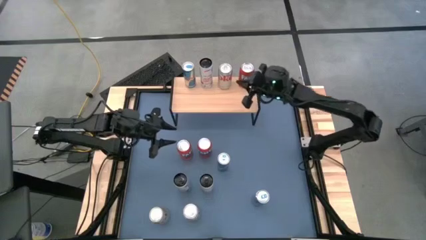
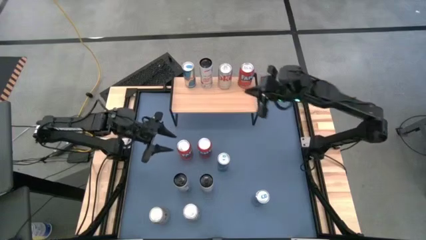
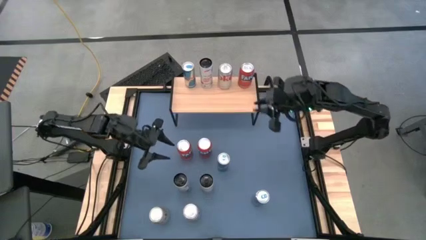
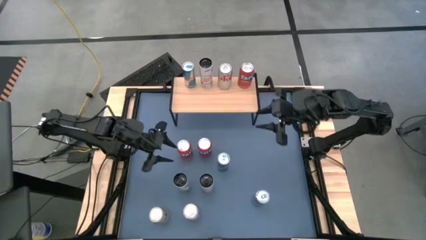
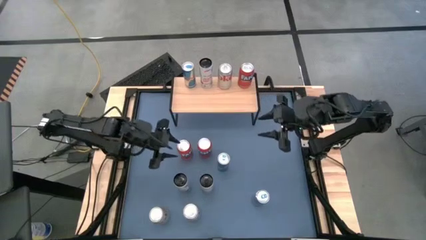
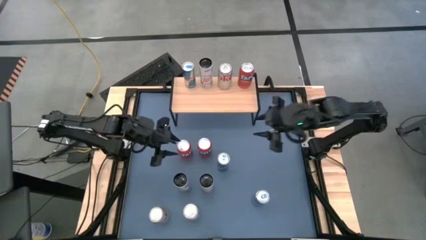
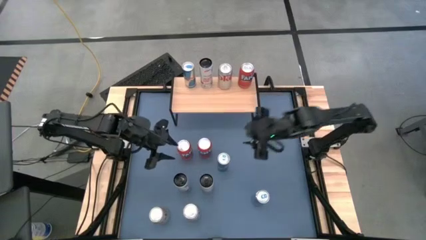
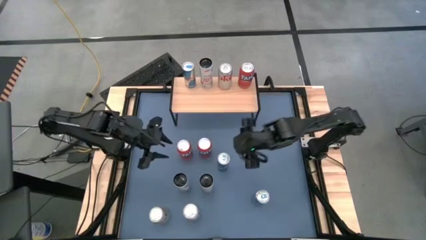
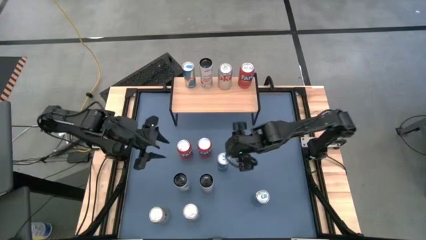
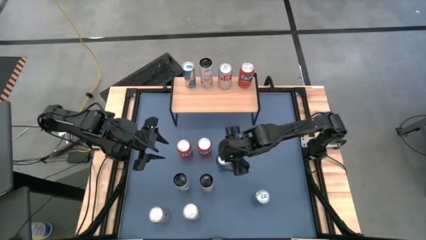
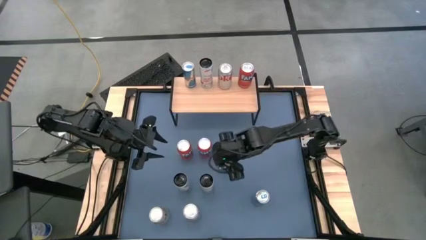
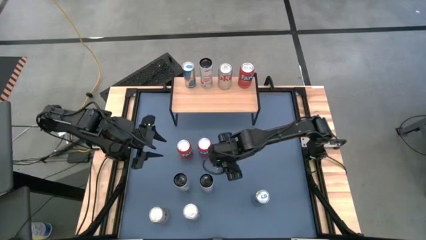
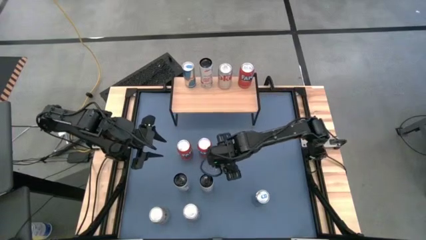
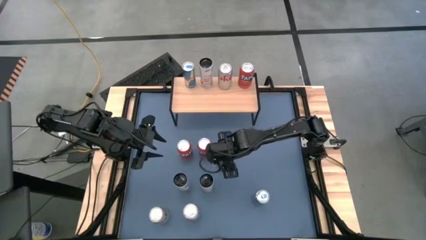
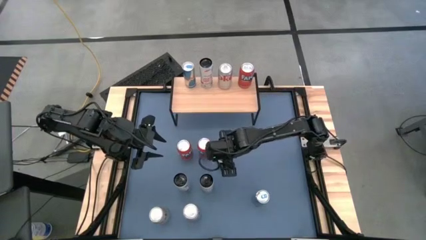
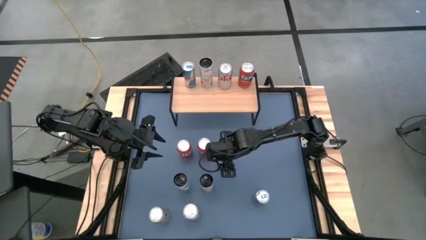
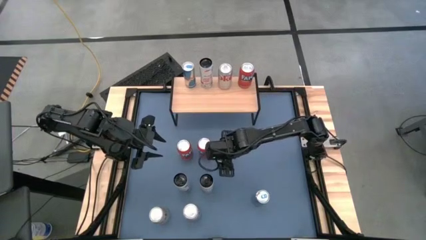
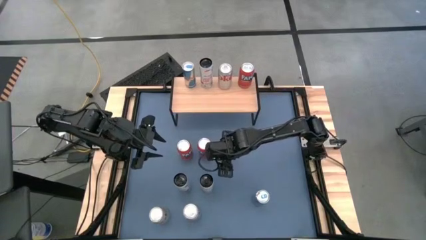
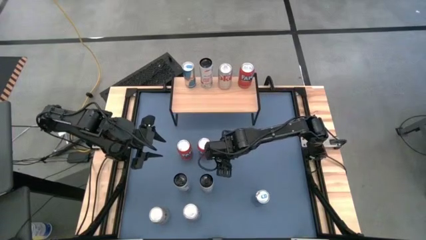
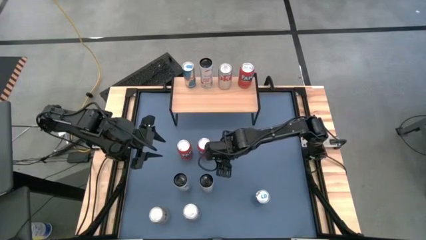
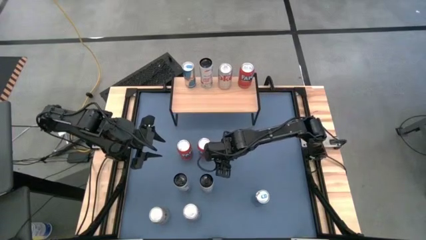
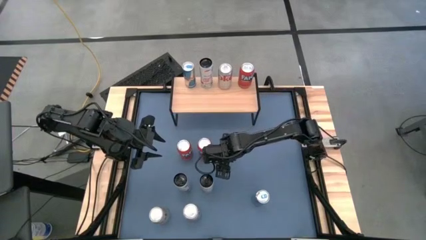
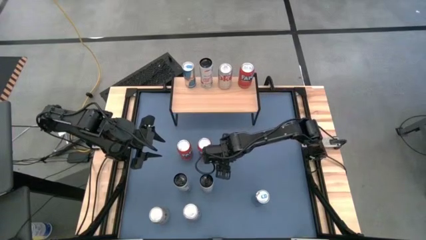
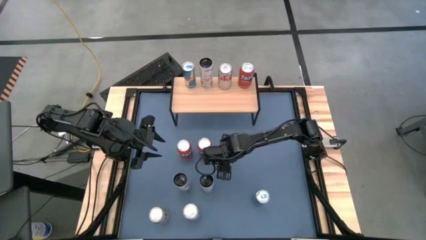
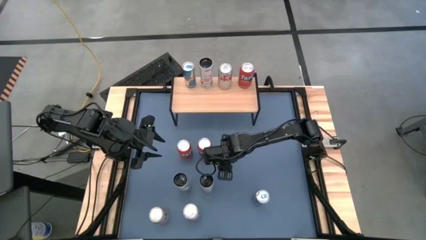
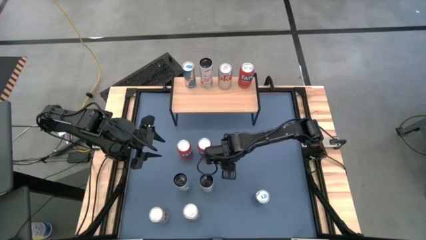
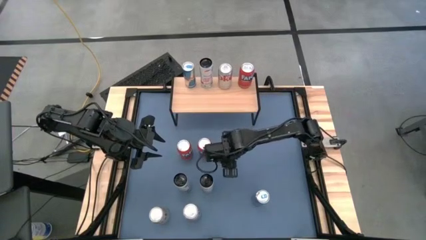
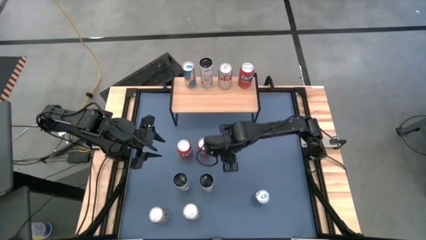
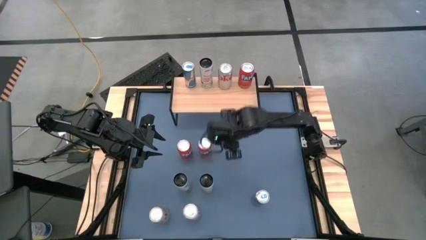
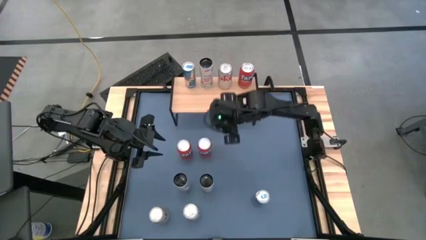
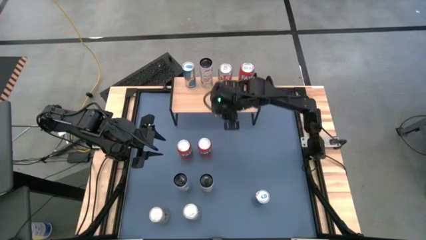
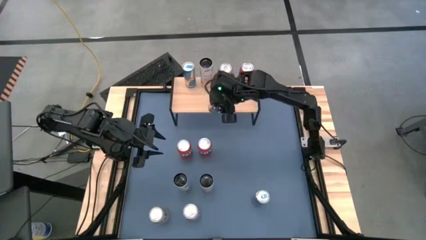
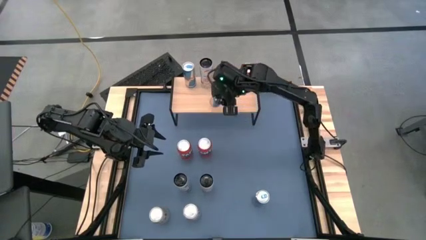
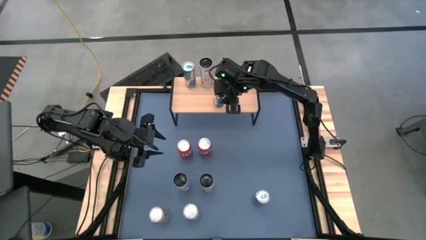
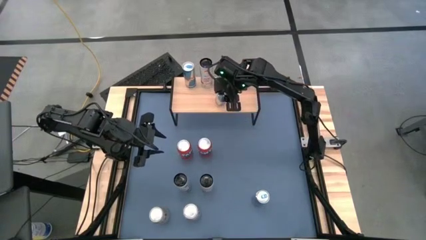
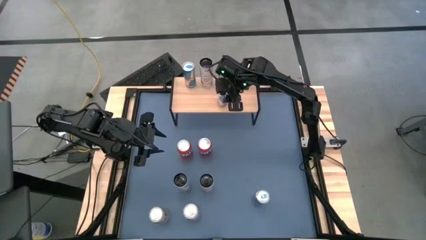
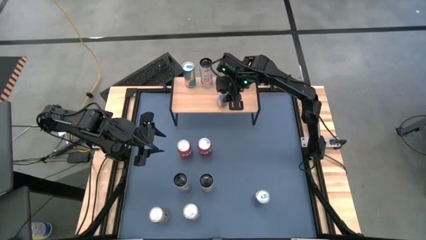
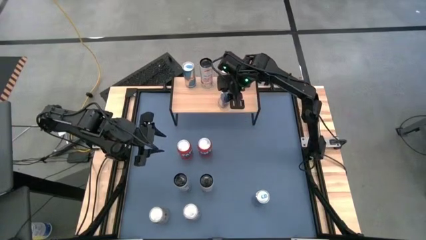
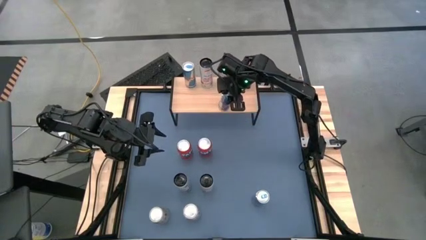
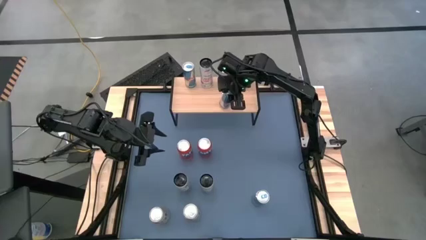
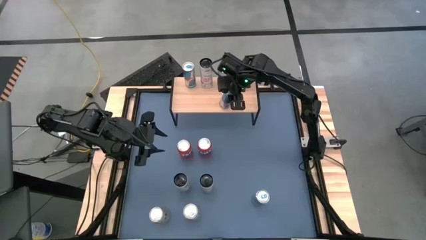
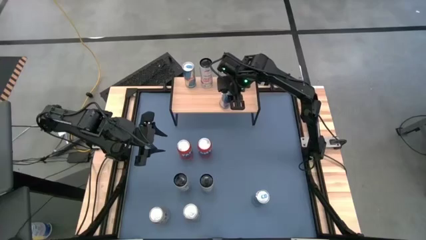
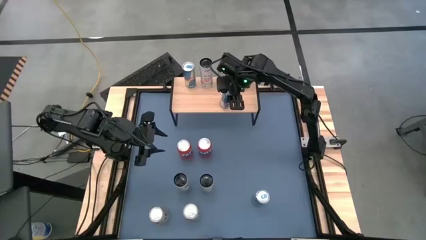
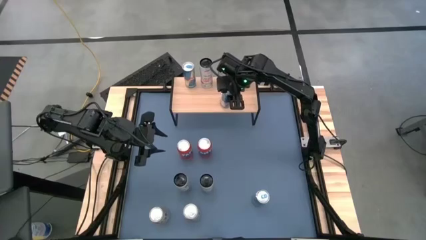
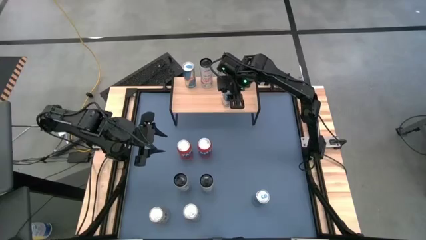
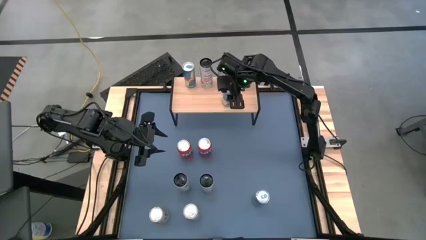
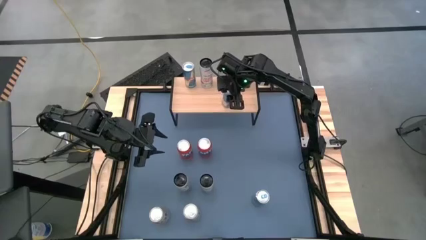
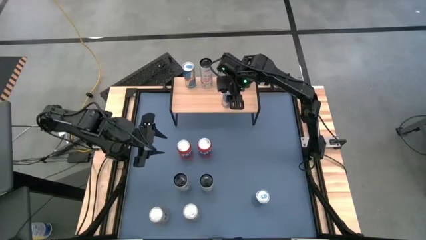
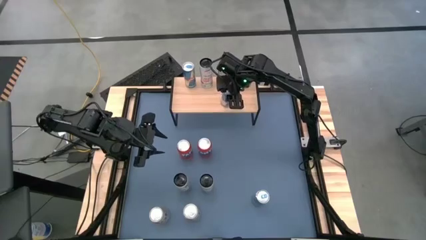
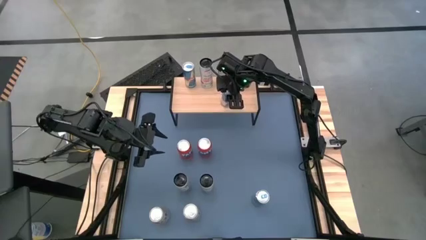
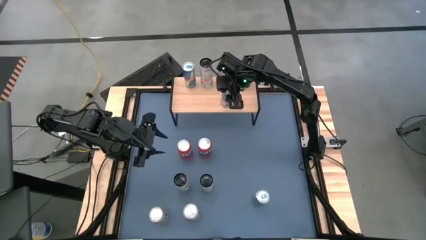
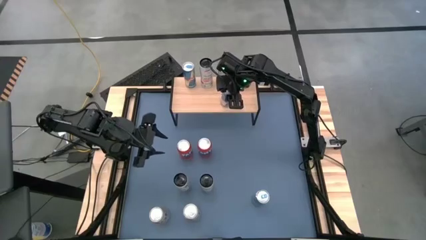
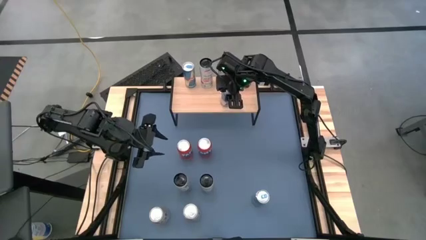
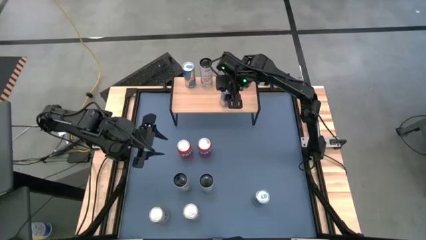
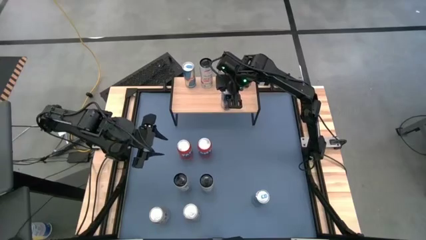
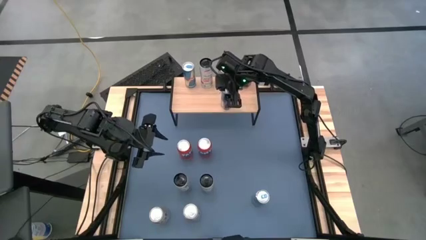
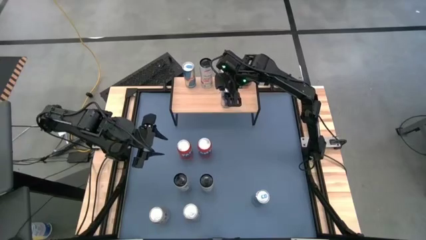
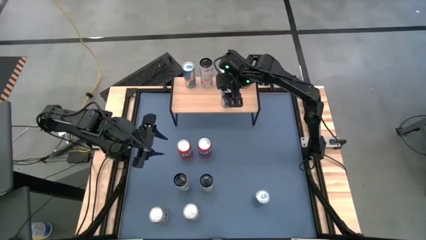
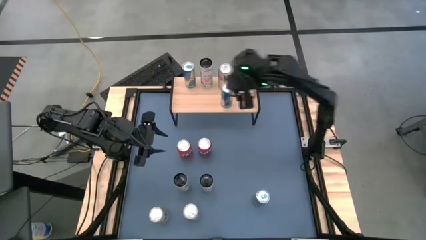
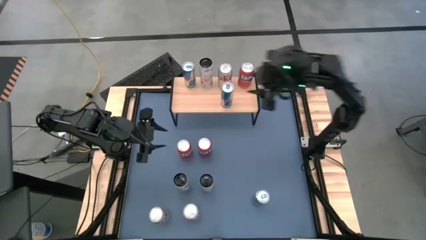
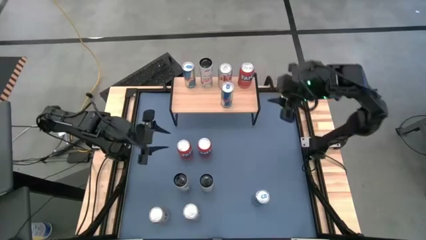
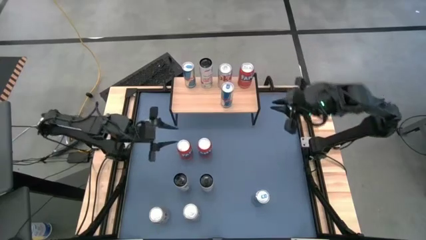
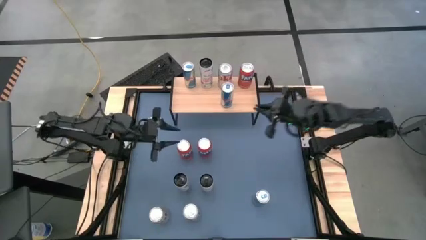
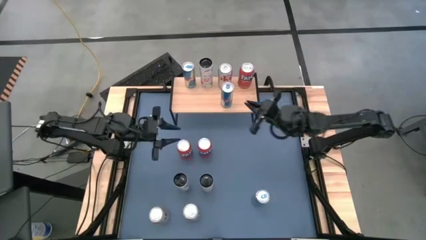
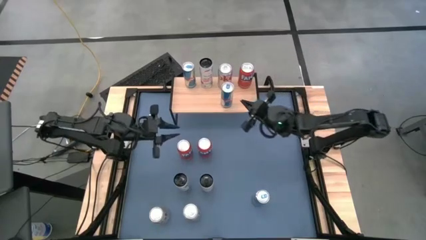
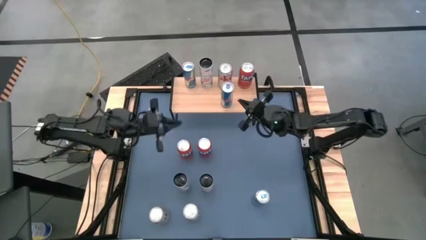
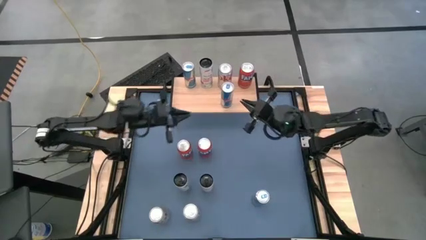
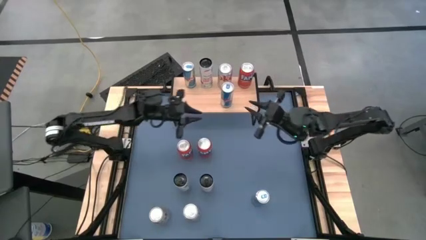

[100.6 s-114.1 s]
Task: Place canned beverage on shelf
Put the top blue soda can on the shelf aligned with the other blue soda can
